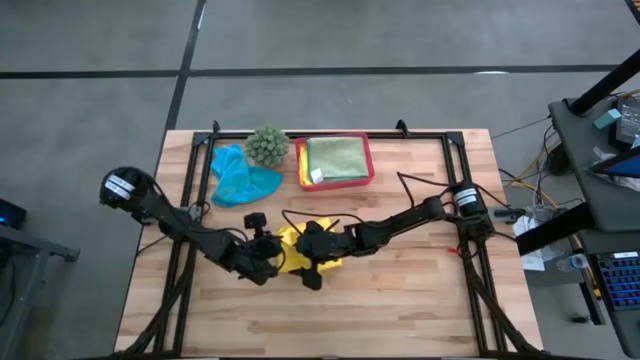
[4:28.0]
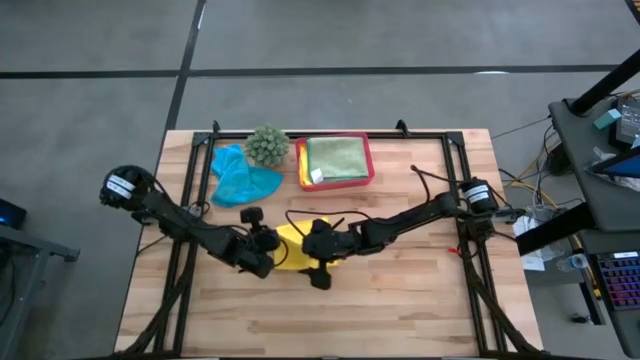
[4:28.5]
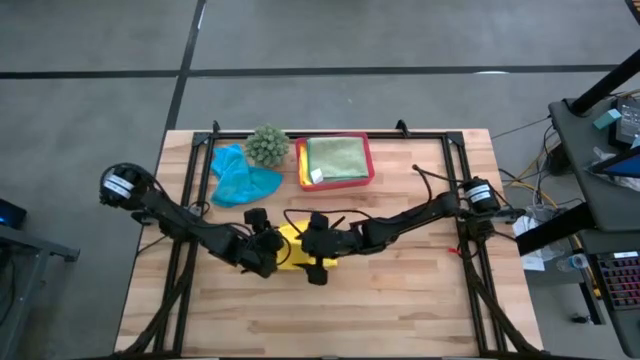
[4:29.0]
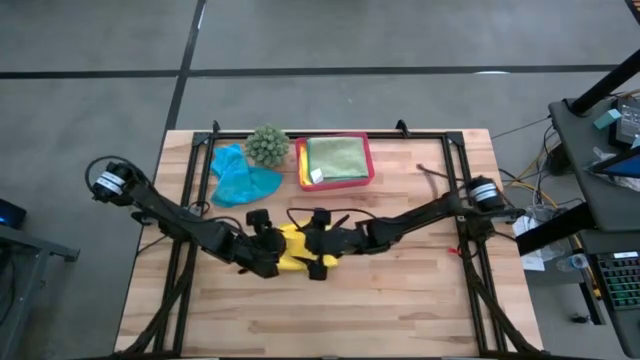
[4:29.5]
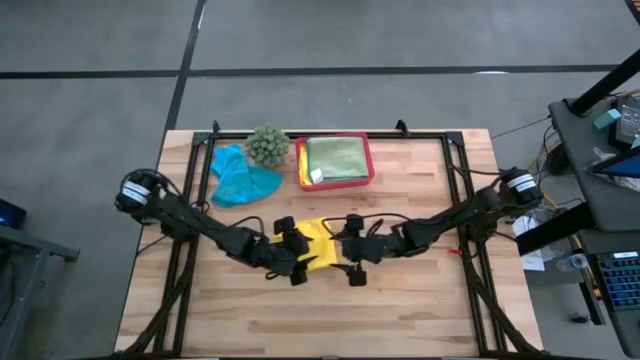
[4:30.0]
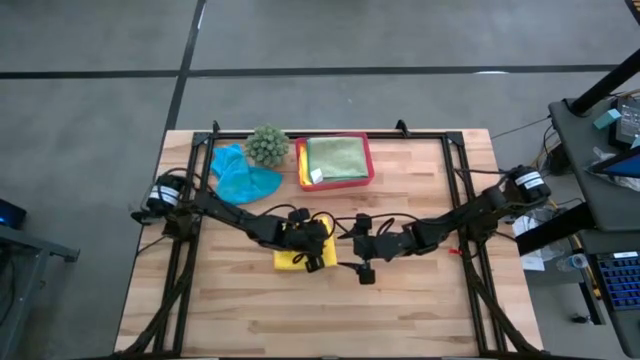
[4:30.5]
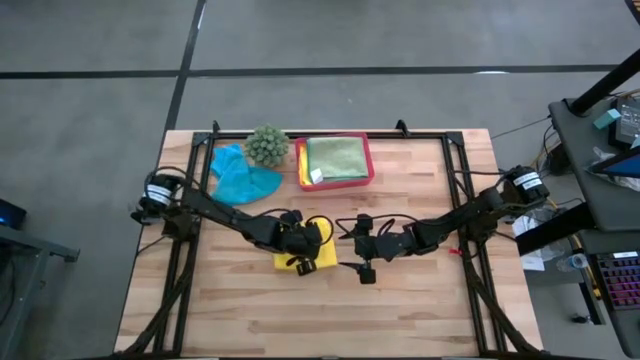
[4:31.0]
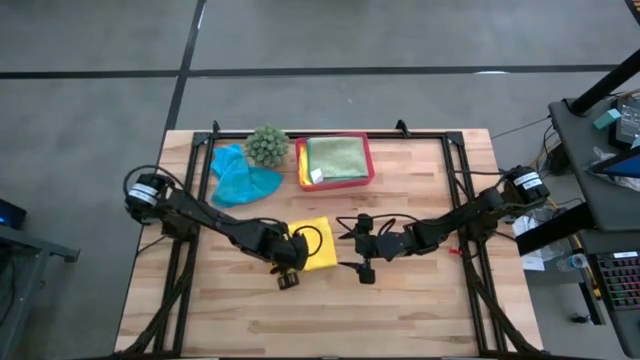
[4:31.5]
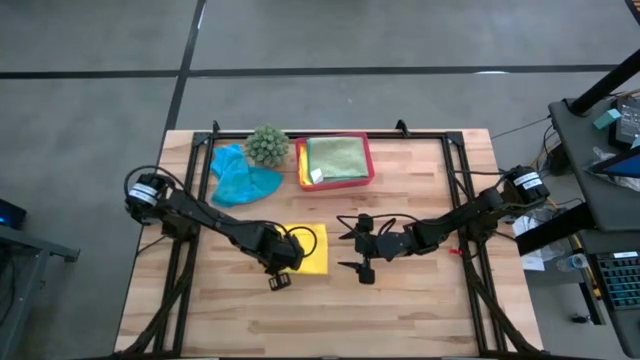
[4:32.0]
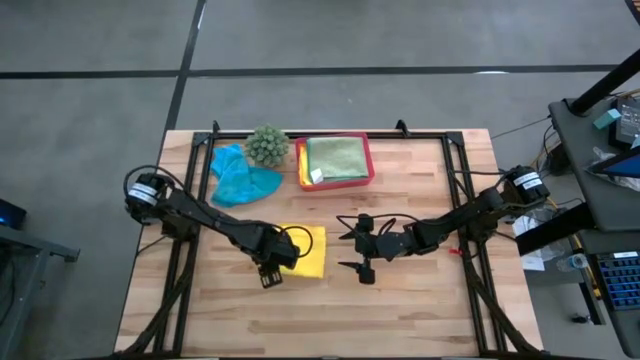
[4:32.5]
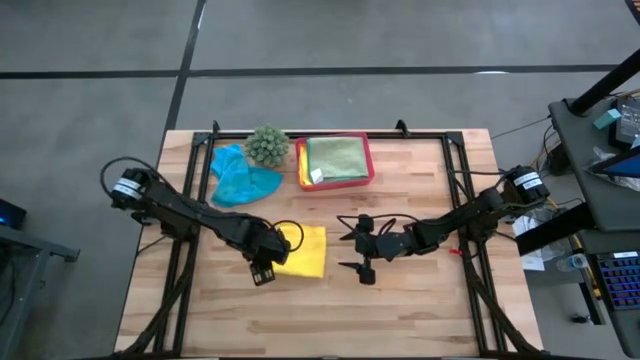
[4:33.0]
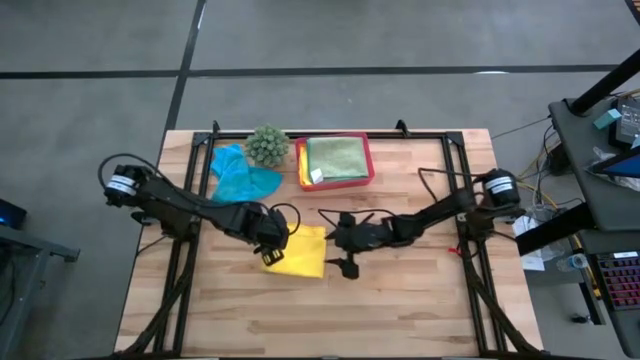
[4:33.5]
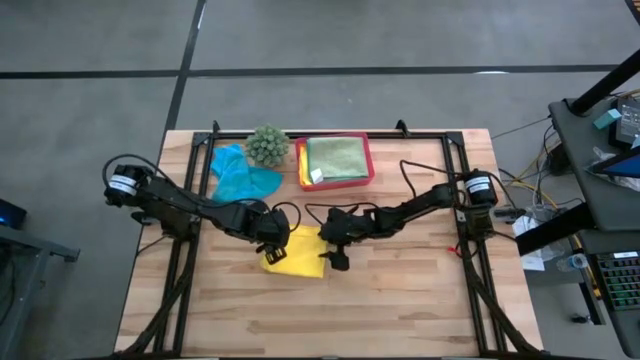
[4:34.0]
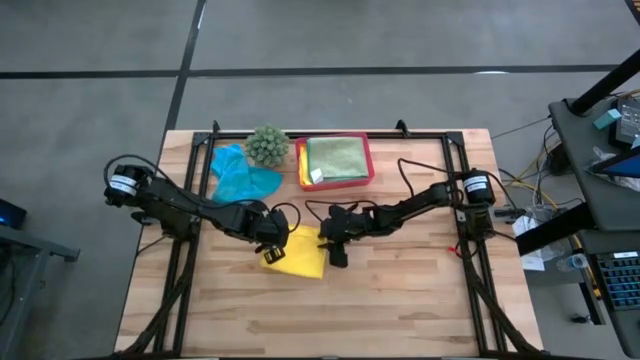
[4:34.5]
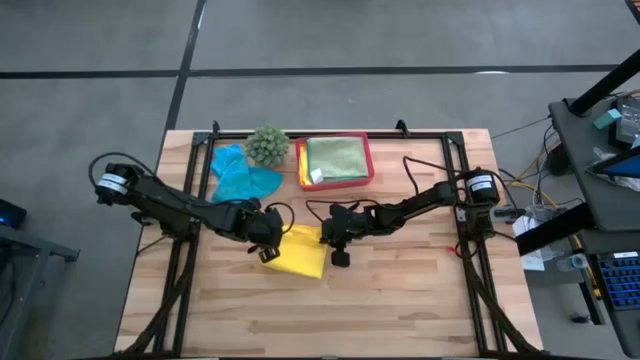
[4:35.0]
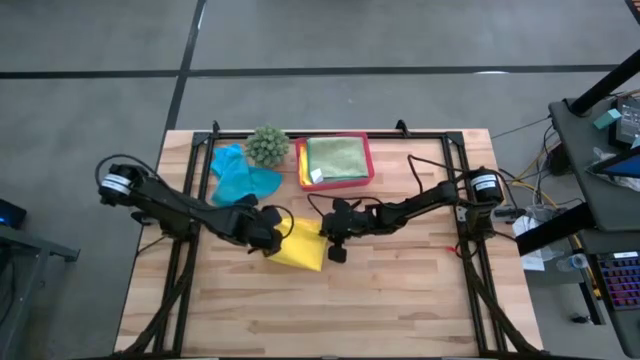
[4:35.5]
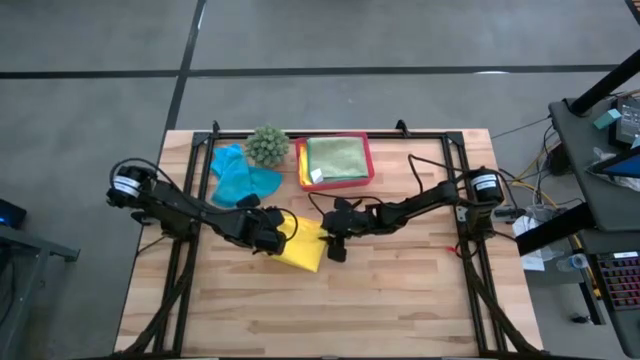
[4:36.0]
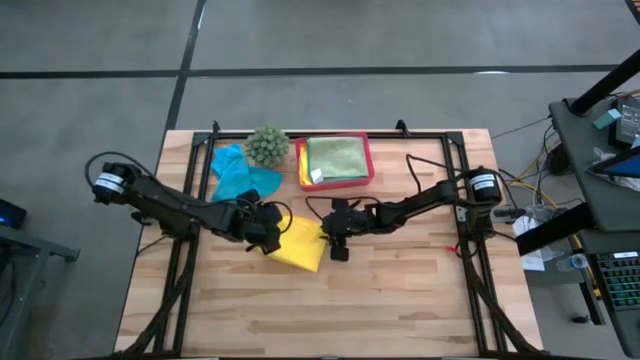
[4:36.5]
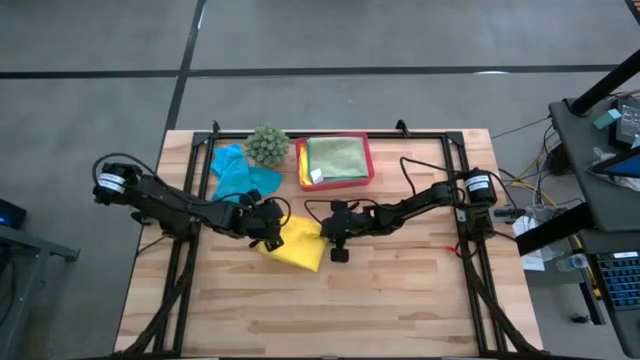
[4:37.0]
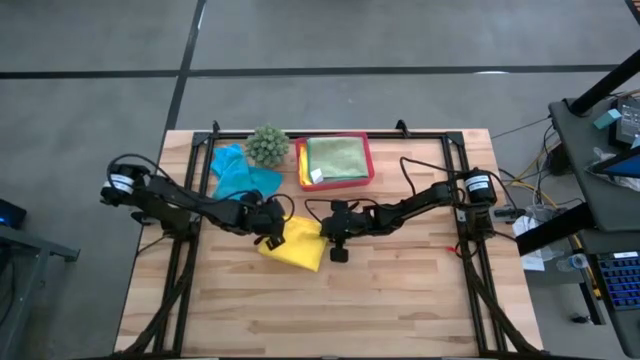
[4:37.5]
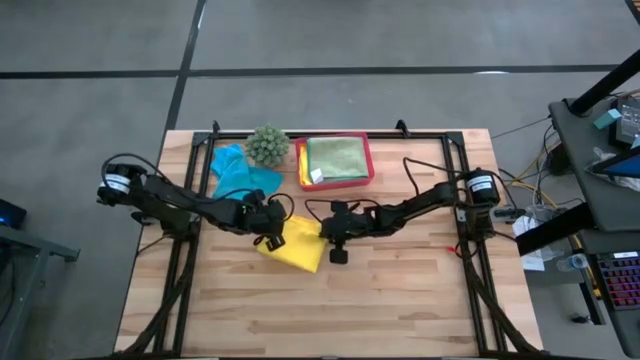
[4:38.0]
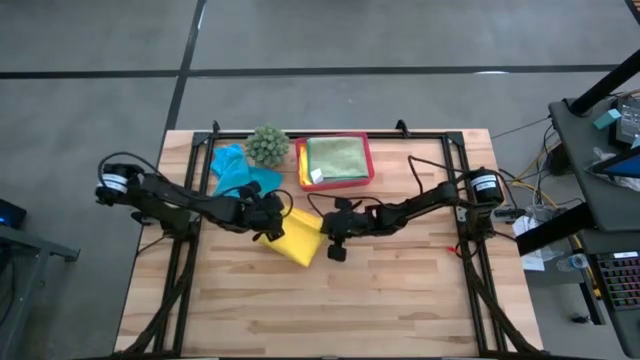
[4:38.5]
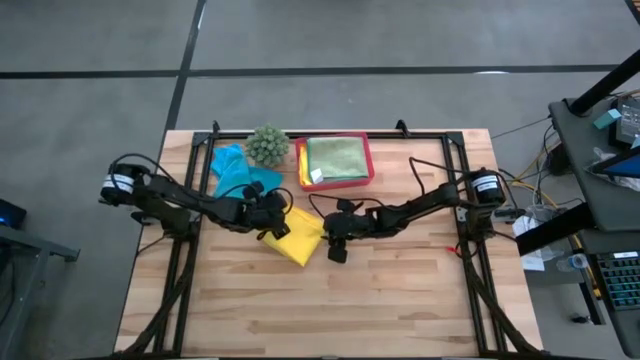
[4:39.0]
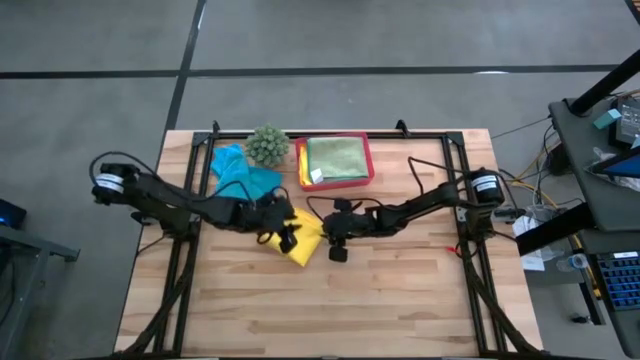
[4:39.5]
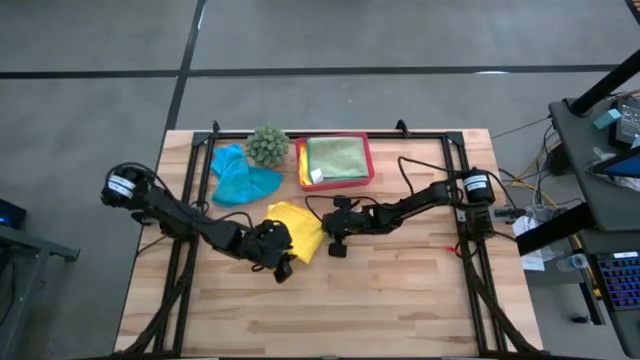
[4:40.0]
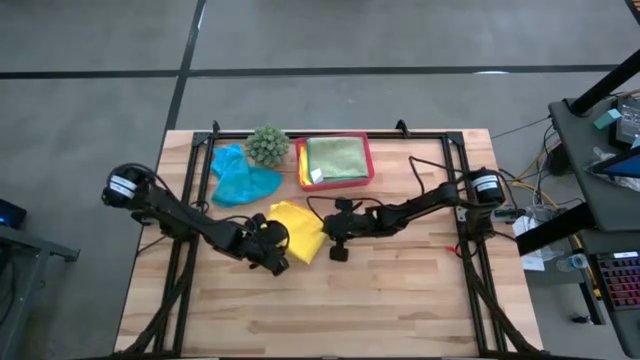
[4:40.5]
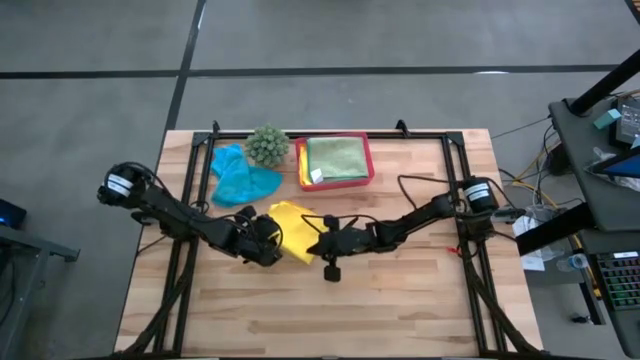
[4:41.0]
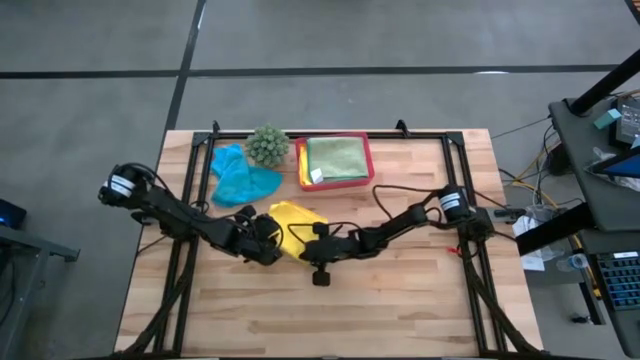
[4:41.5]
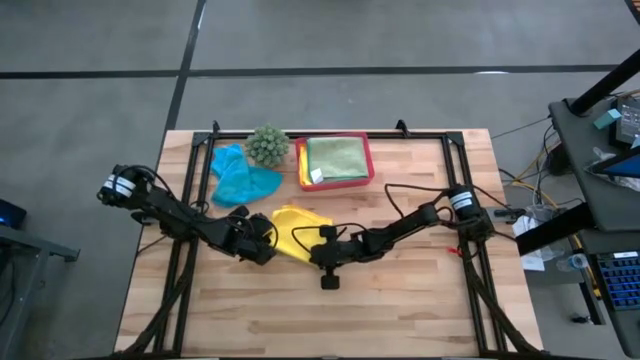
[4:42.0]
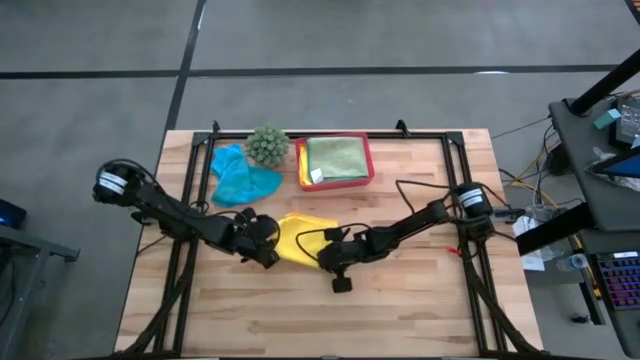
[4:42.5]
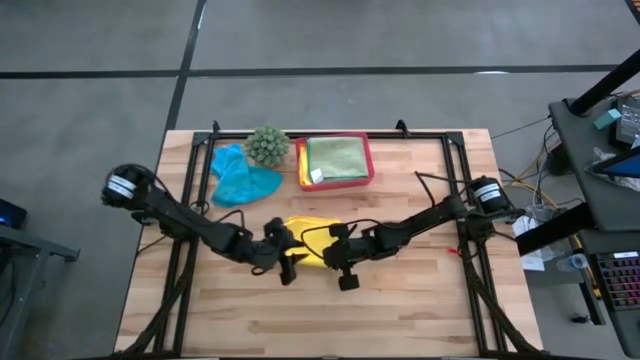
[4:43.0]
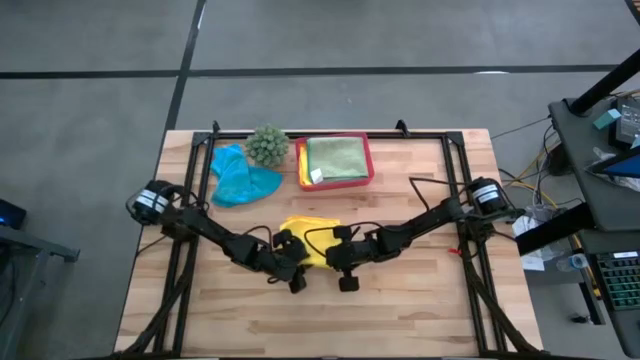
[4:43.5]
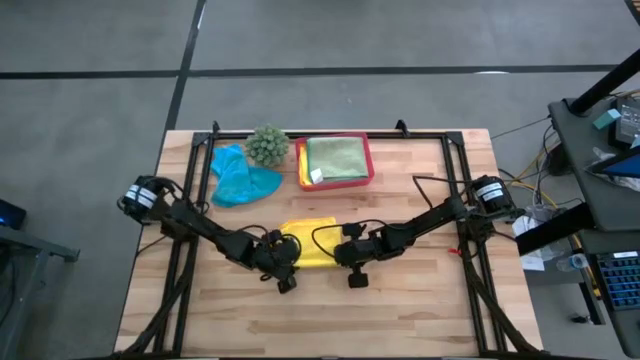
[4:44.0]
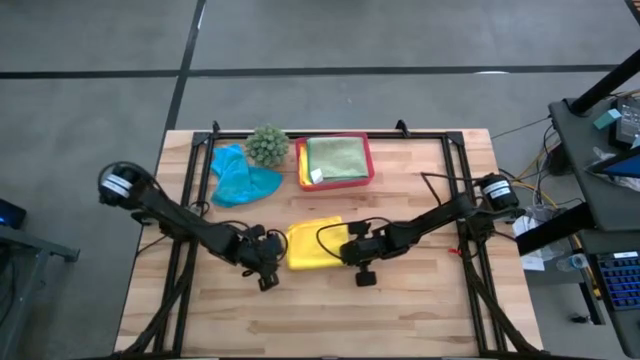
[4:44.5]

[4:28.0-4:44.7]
Task: Fold microfiber towels
Fold the yellow microfiber towel

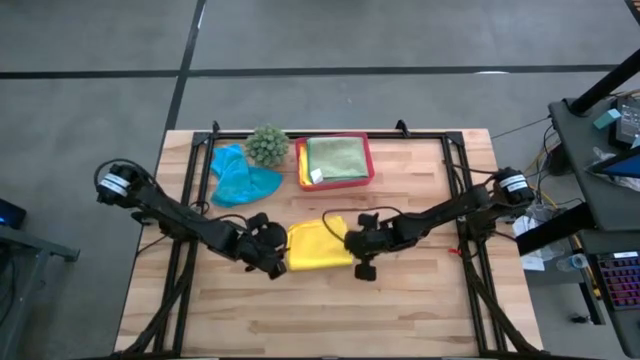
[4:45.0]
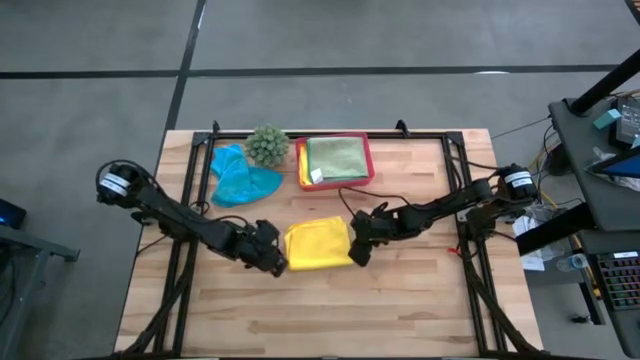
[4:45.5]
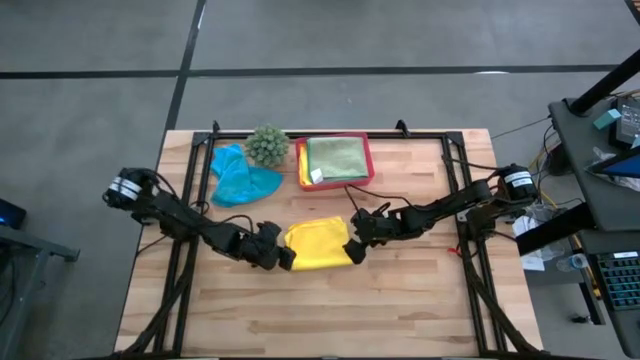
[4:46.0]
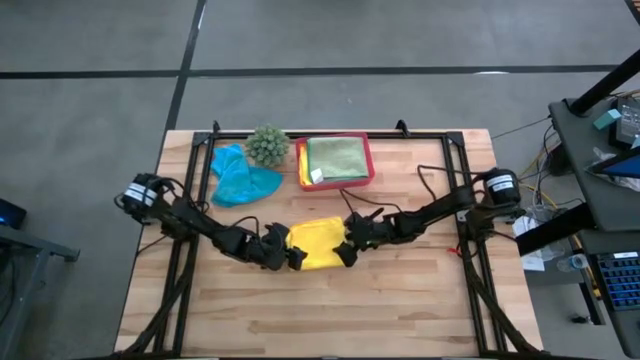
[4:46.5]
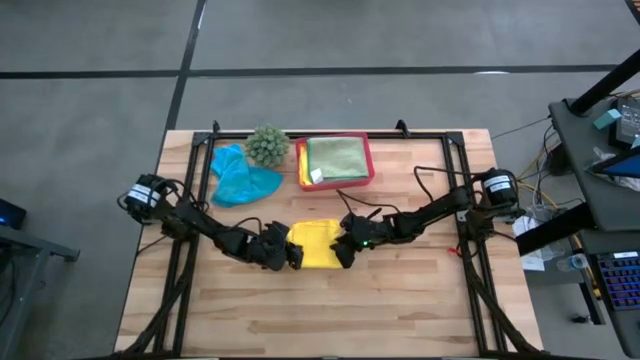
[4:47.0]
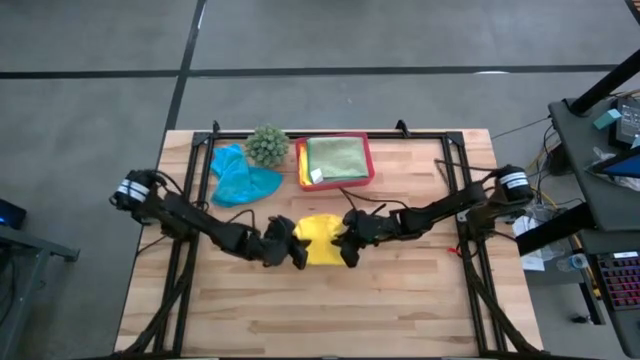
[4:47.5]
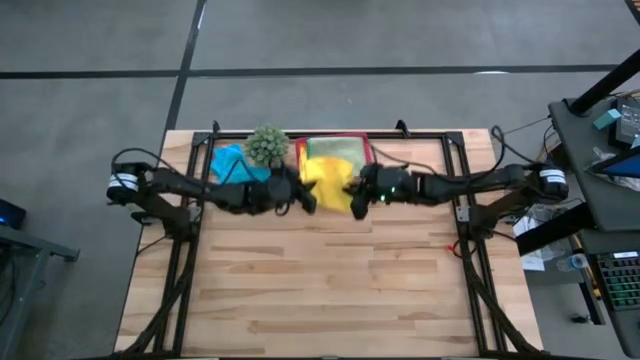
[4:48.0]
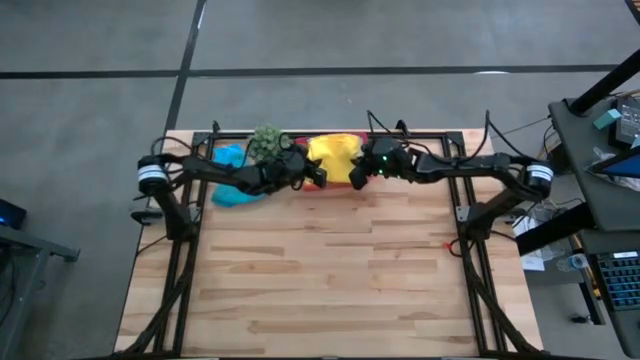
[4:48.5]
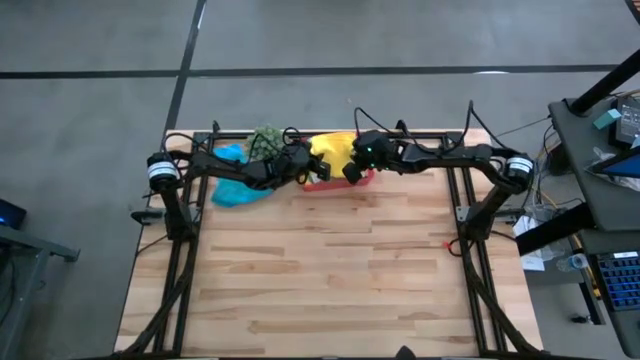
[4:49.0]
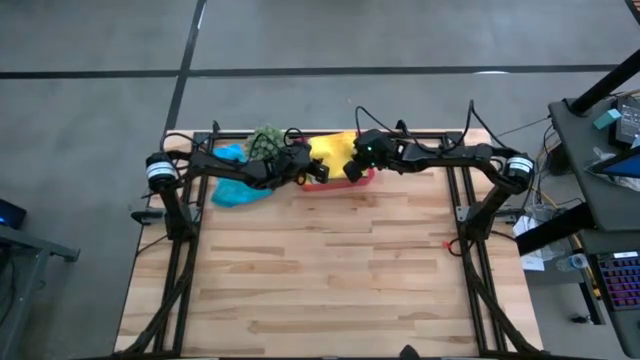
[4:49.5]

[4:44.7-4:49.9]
Put the folded yellow microfiber towel into the red bin
